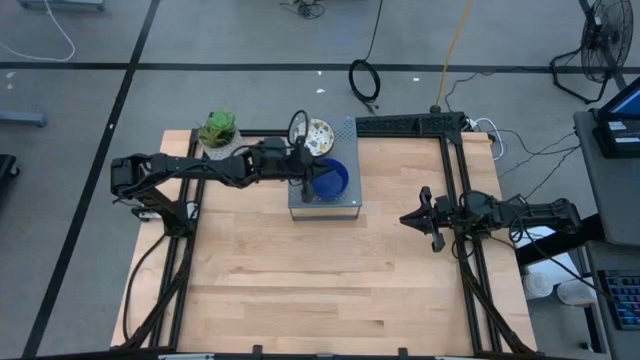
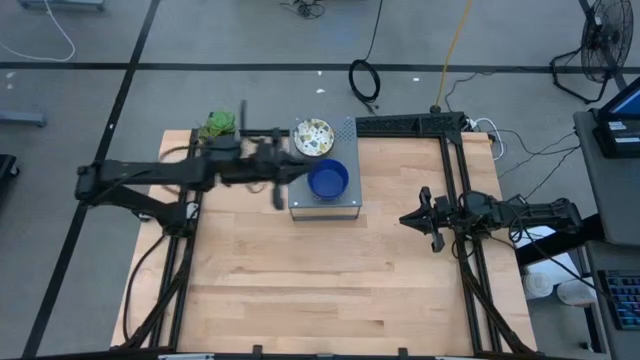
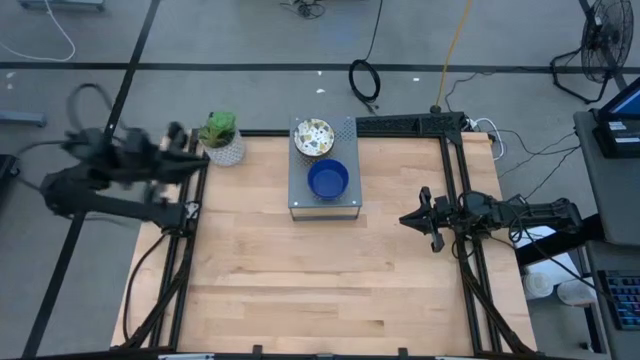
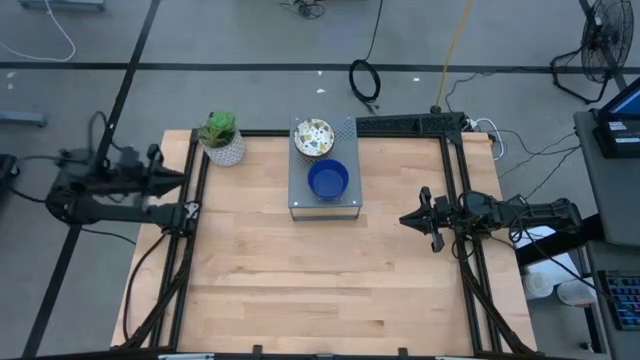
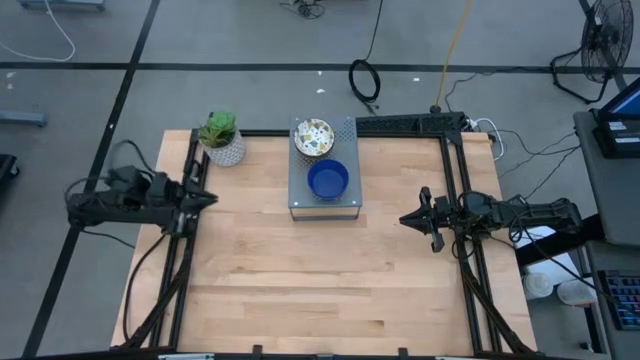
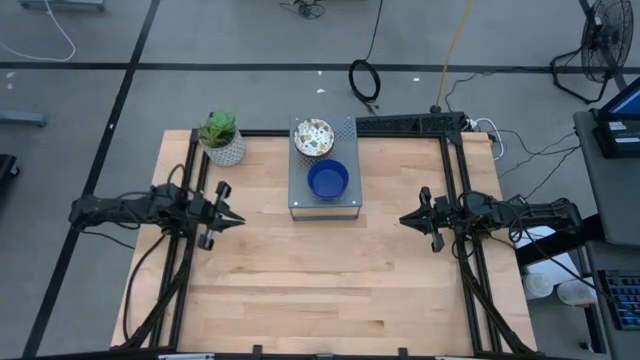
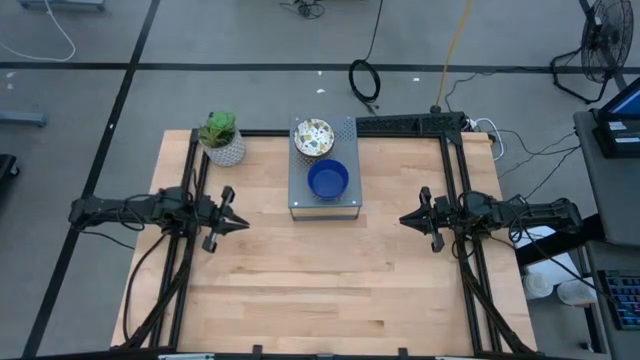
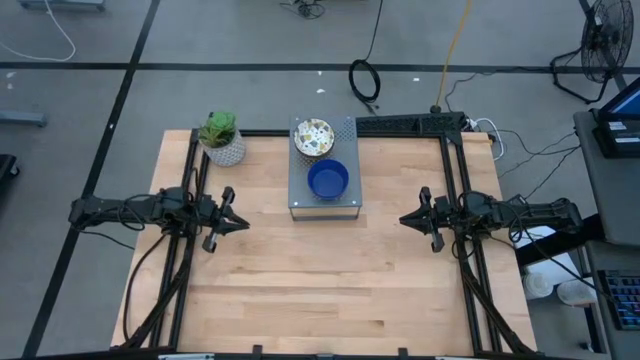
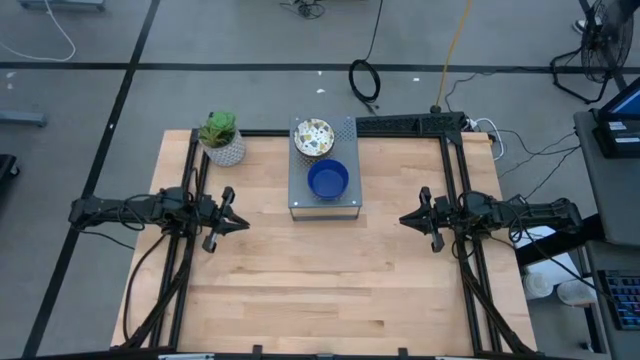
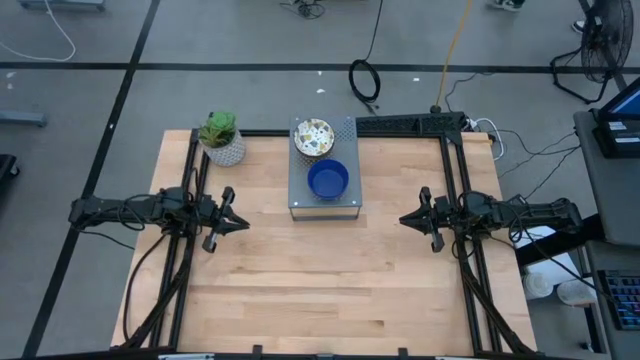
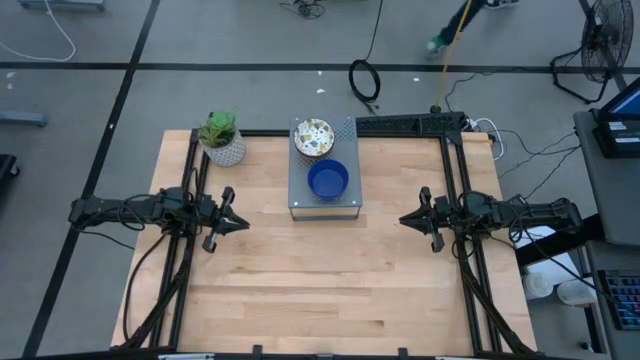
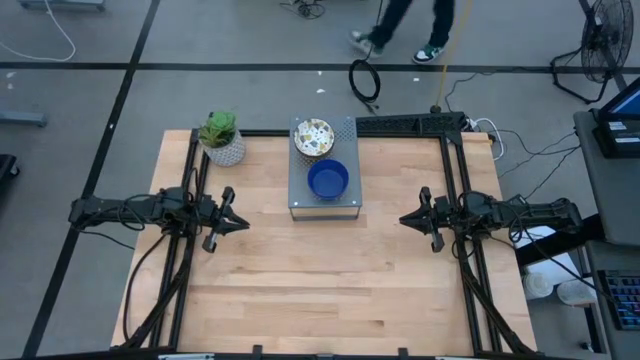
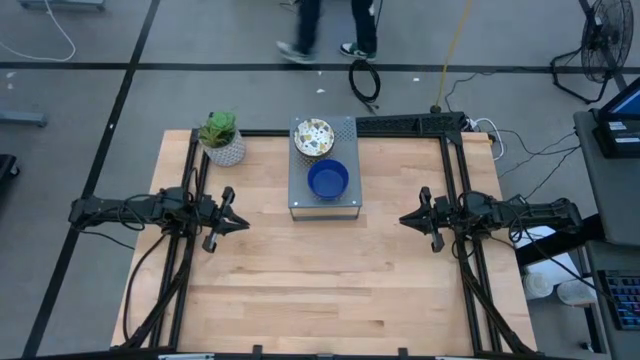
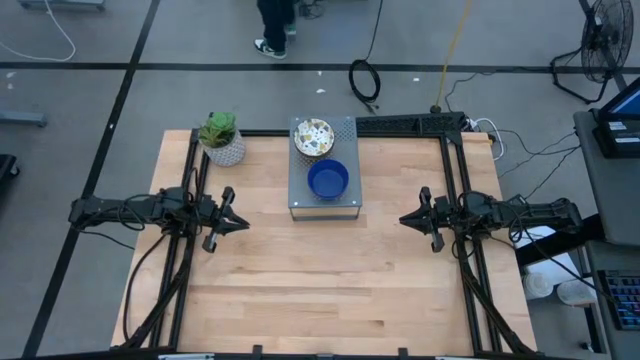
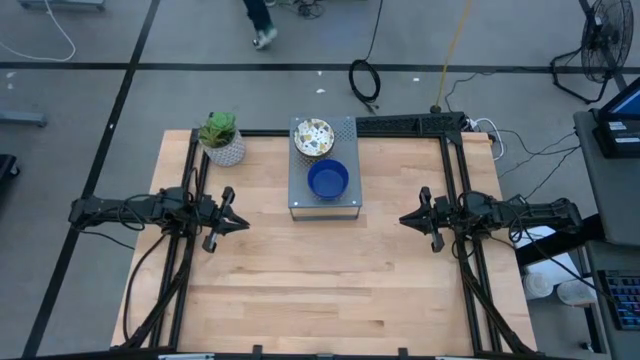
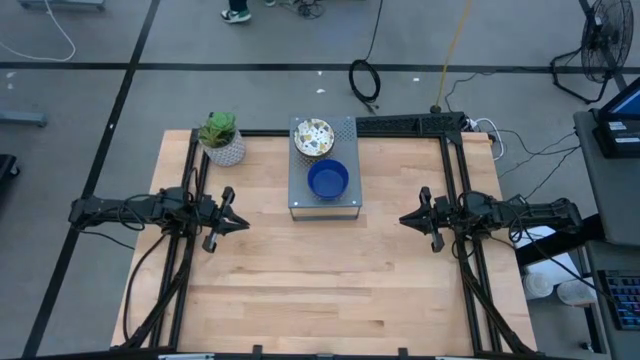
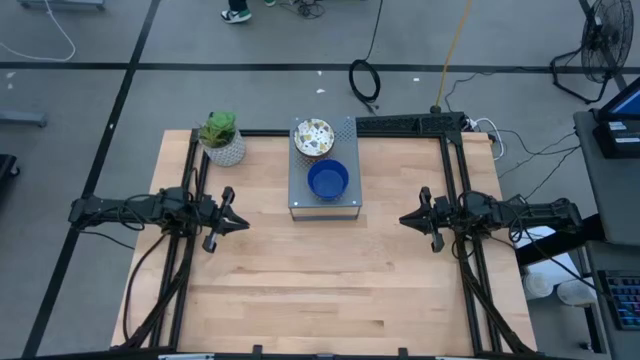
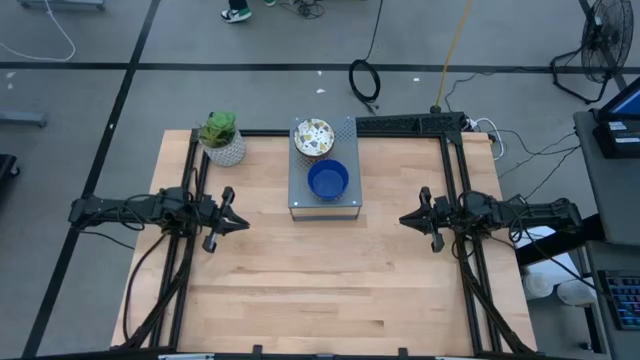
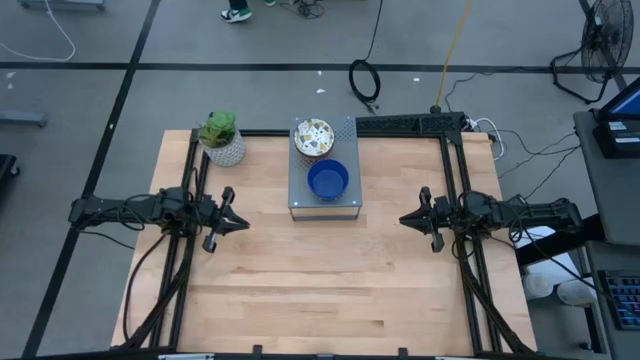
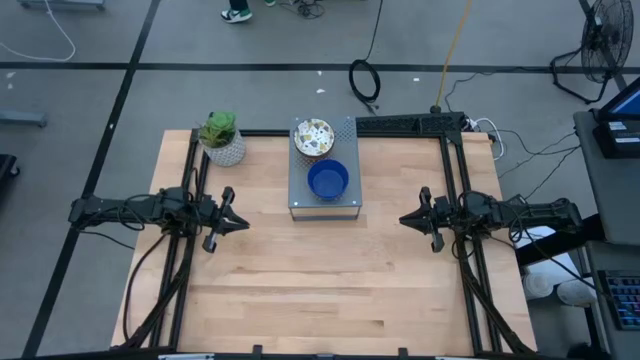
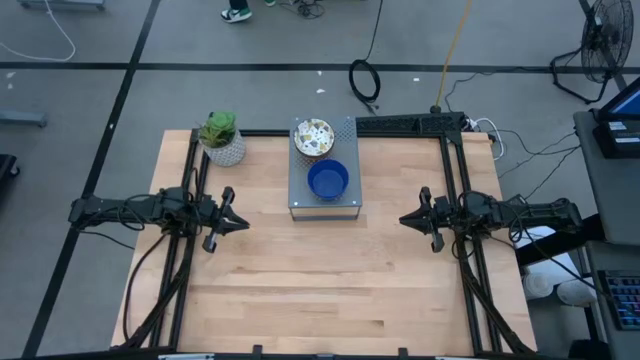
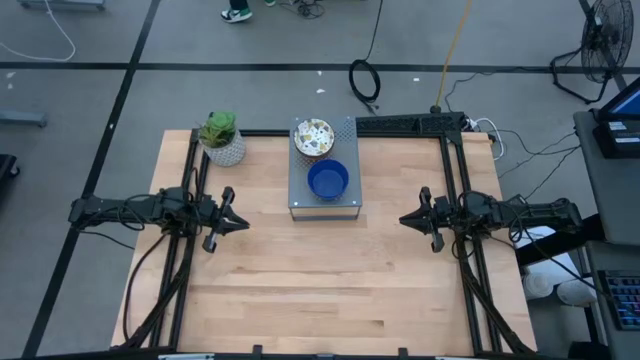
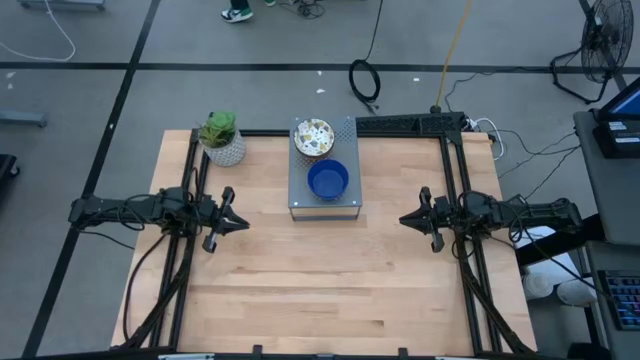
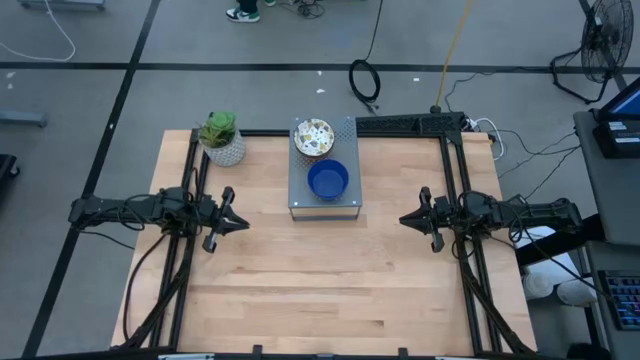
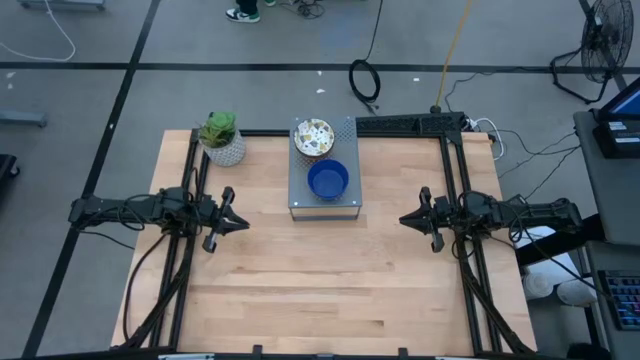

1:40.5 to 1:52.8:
Task: Pick & Place Mini bowls
Return to Home Position

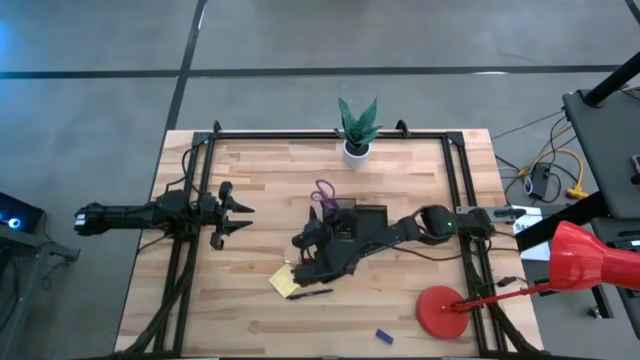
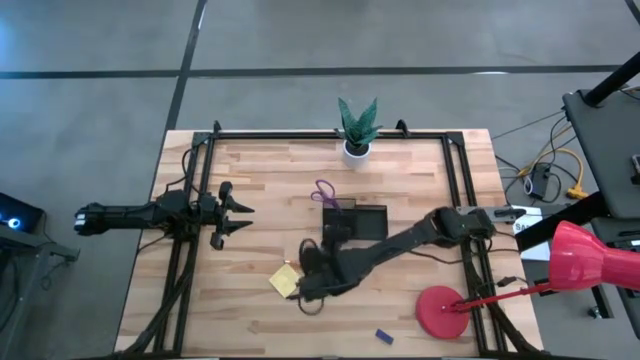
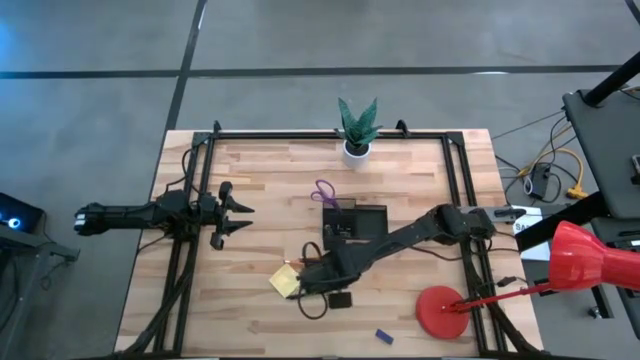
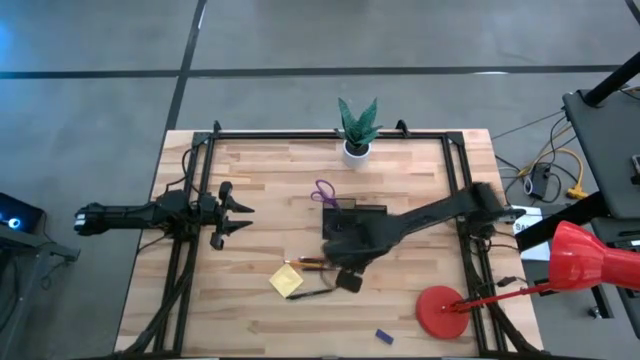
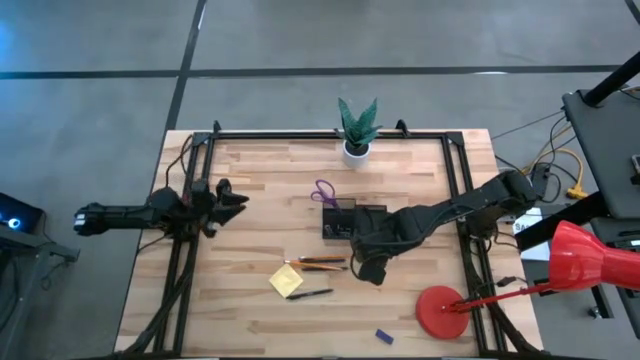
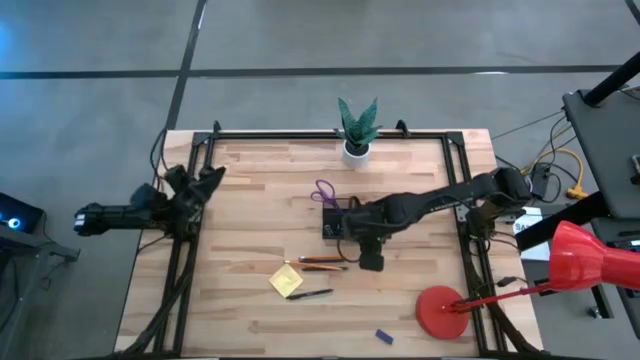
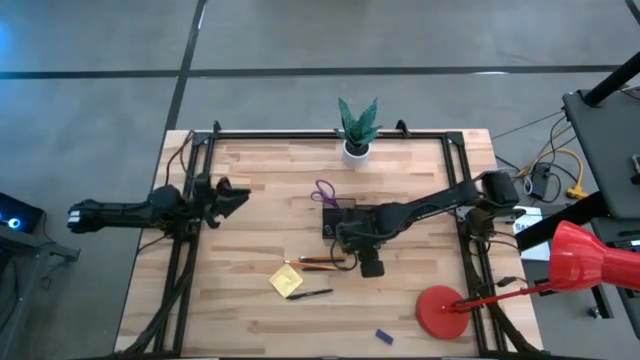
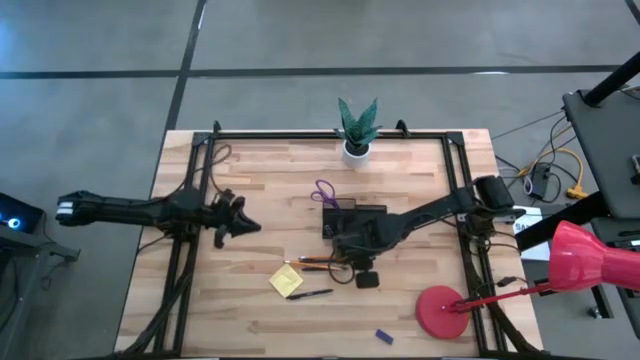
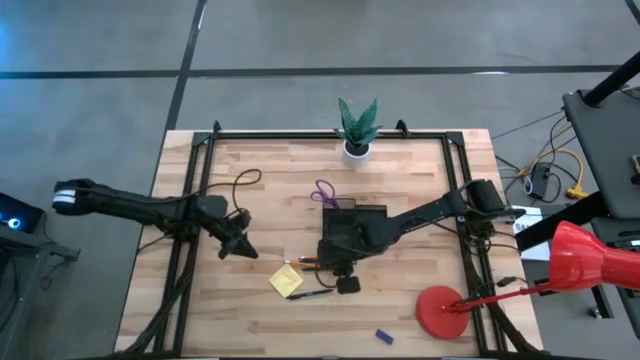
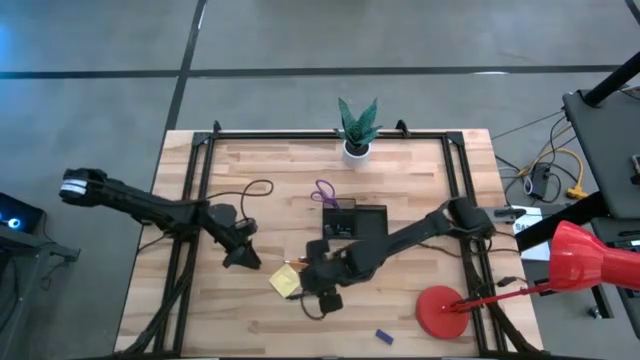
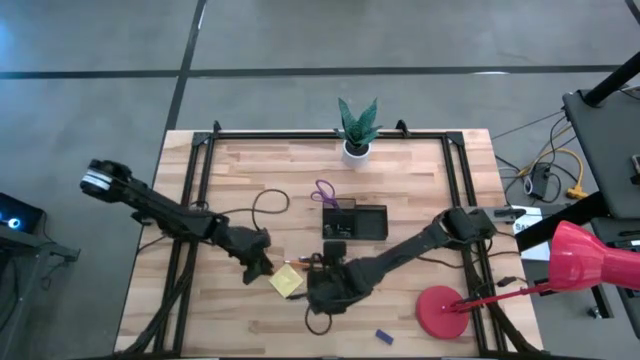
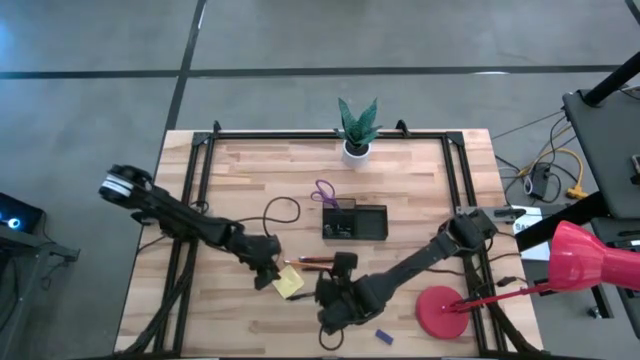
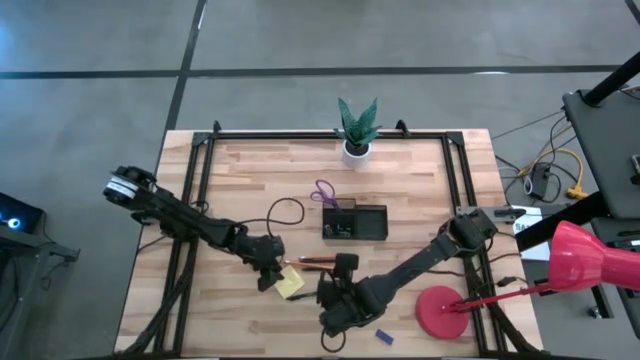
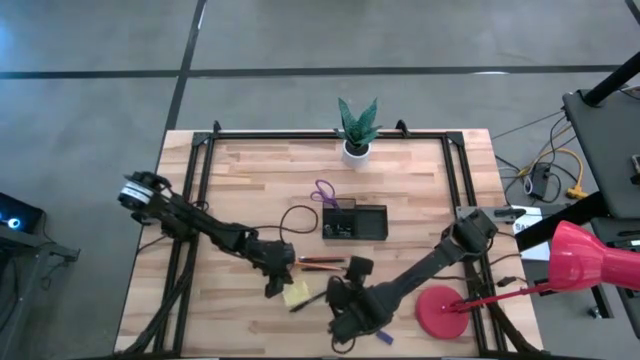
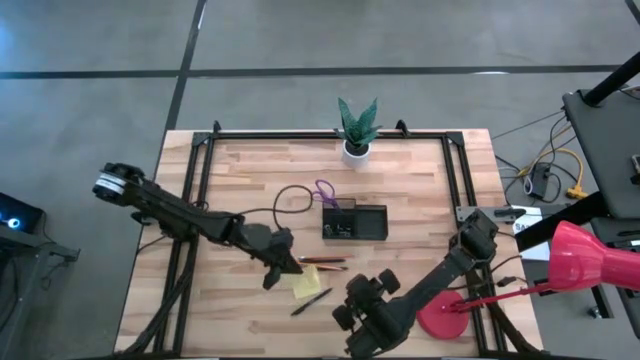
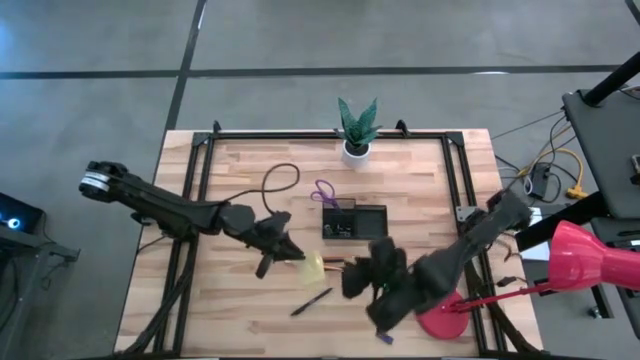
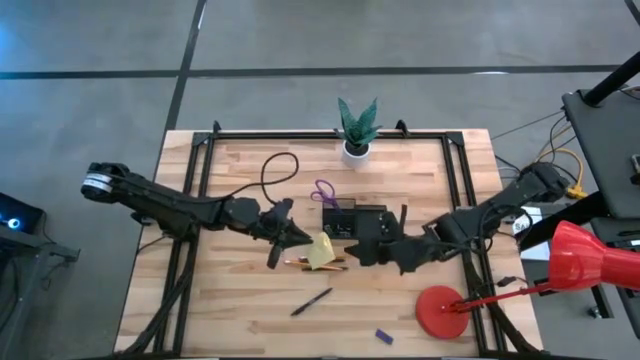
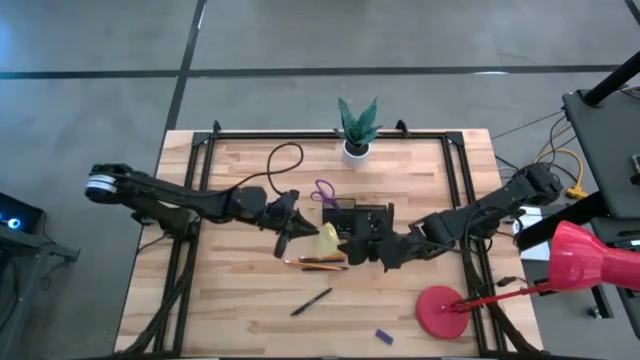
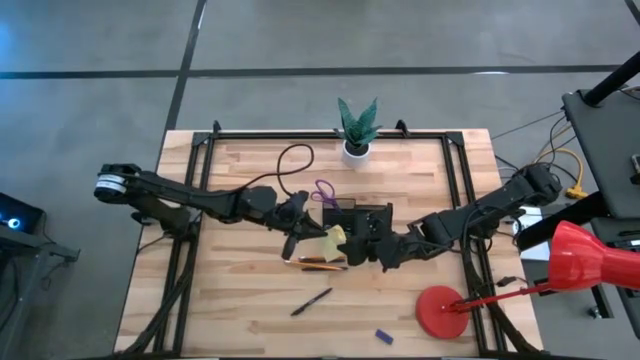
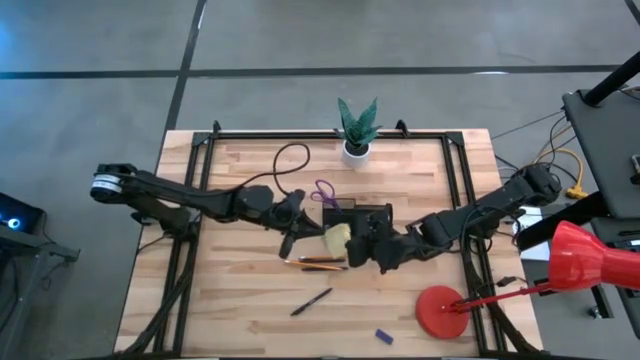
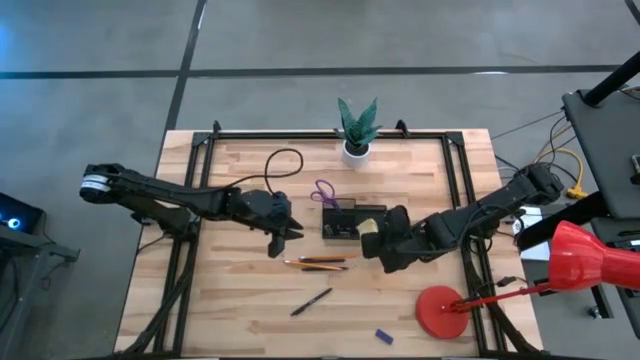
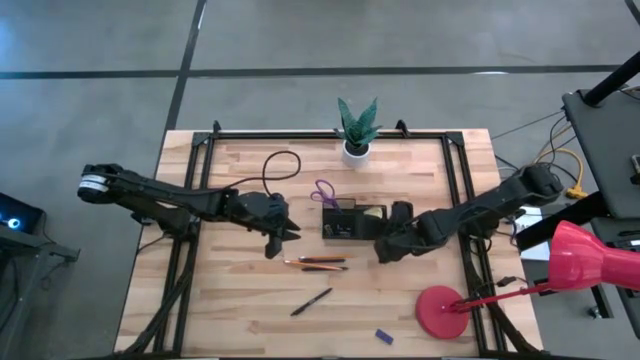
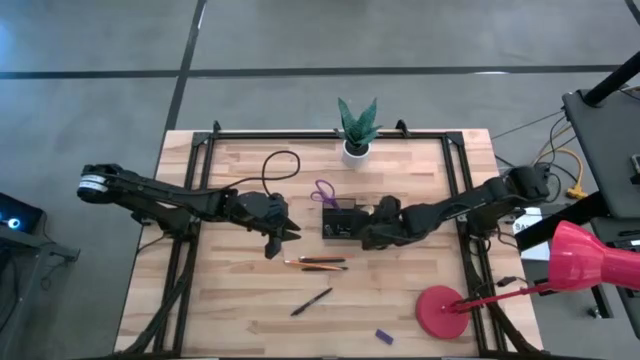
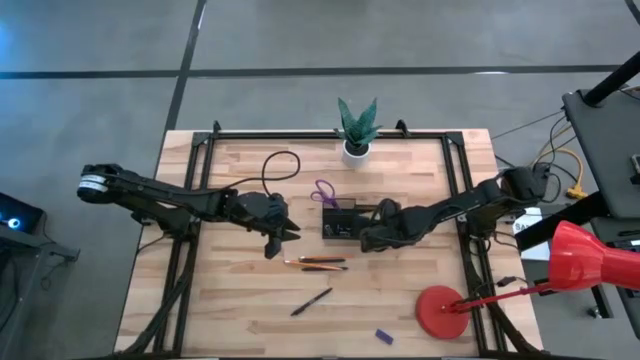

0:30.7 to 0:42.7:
Task: Pick and place office supplies into organizer
Put the yellow pad into the black organizer
